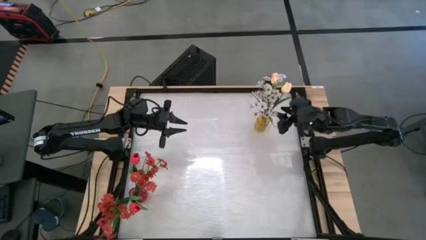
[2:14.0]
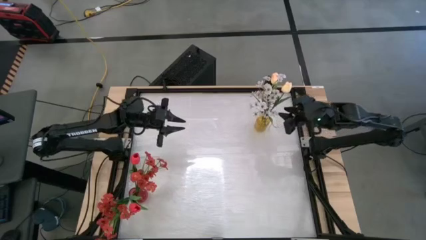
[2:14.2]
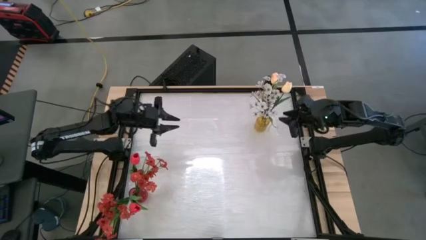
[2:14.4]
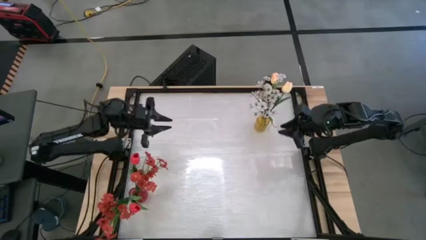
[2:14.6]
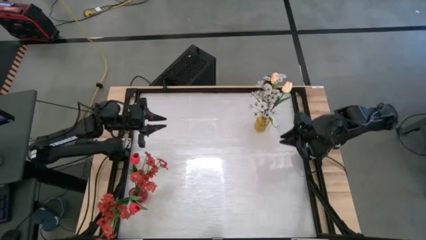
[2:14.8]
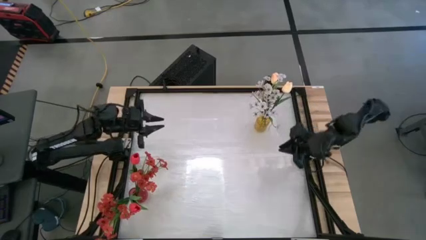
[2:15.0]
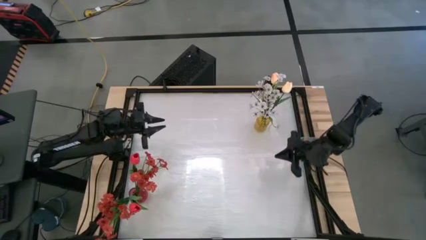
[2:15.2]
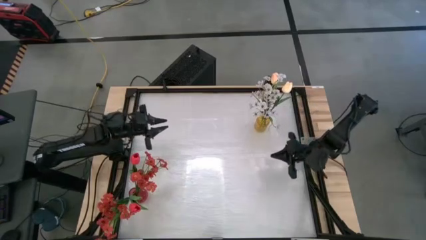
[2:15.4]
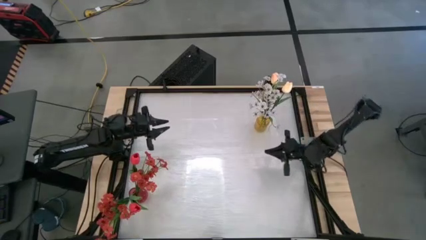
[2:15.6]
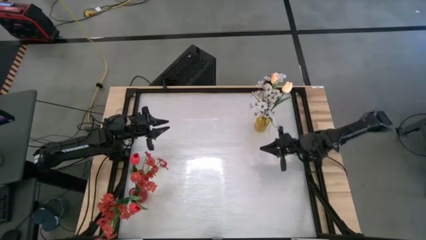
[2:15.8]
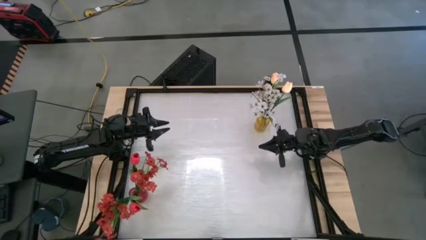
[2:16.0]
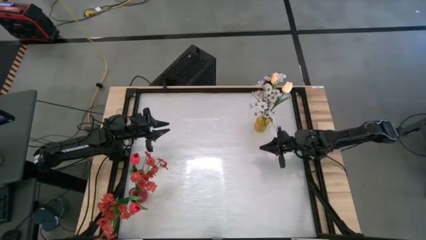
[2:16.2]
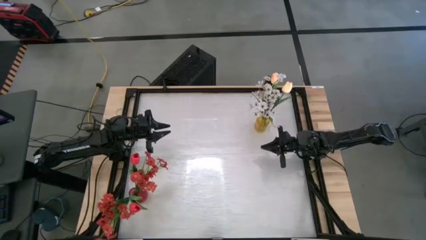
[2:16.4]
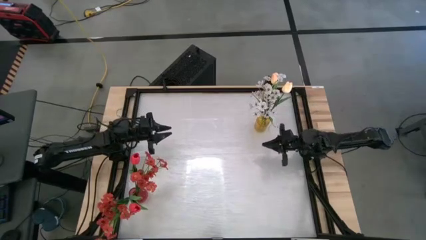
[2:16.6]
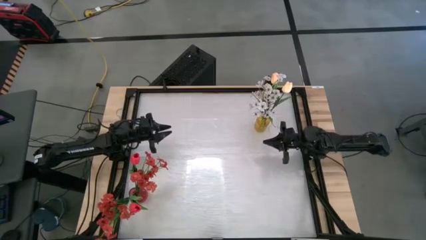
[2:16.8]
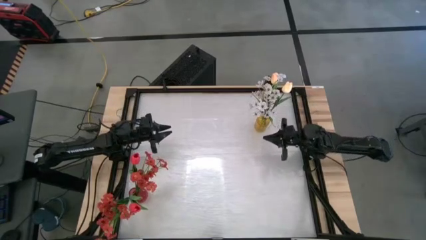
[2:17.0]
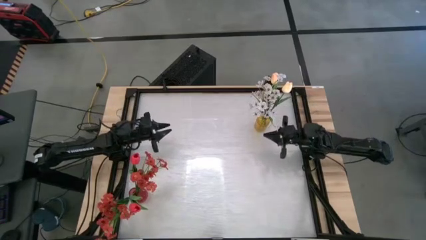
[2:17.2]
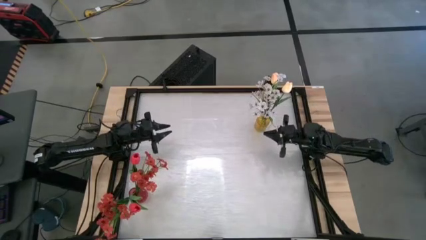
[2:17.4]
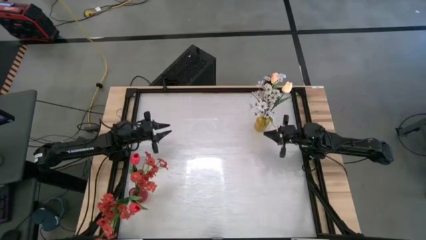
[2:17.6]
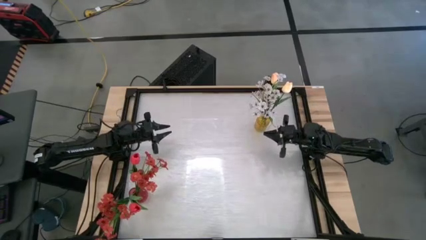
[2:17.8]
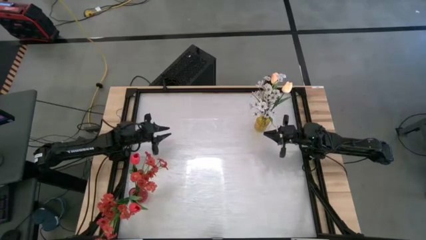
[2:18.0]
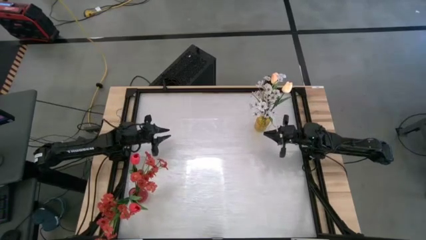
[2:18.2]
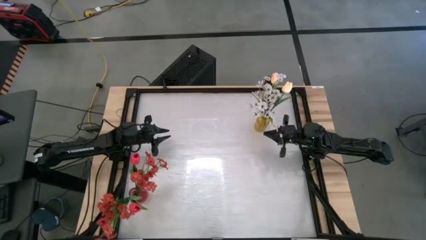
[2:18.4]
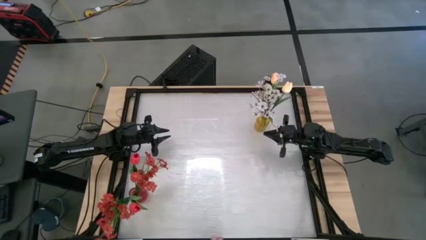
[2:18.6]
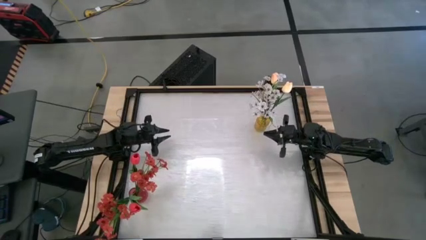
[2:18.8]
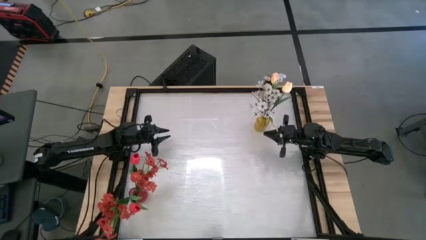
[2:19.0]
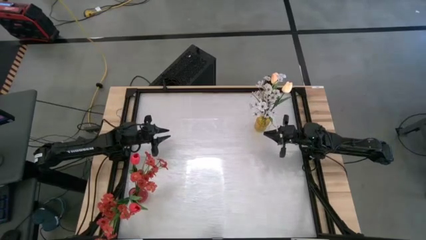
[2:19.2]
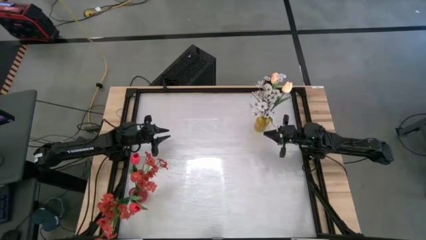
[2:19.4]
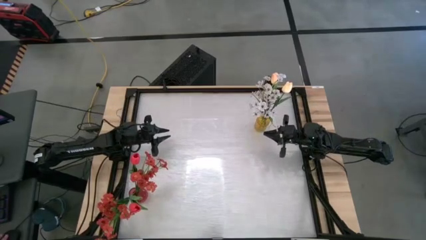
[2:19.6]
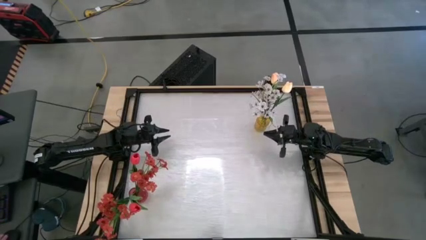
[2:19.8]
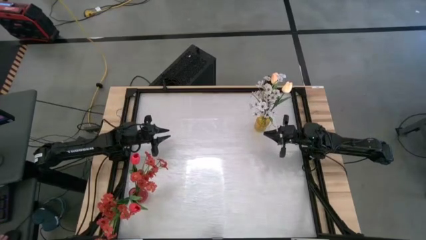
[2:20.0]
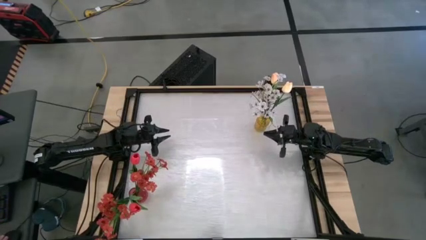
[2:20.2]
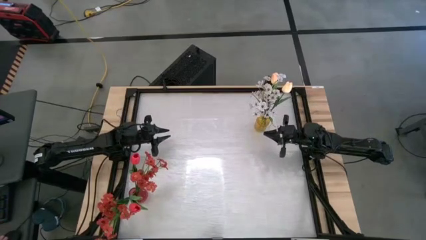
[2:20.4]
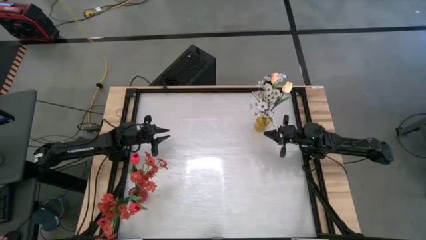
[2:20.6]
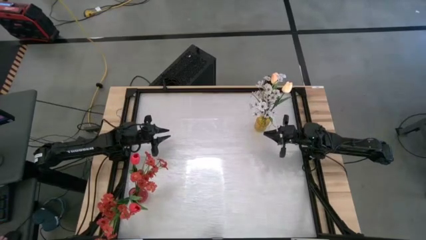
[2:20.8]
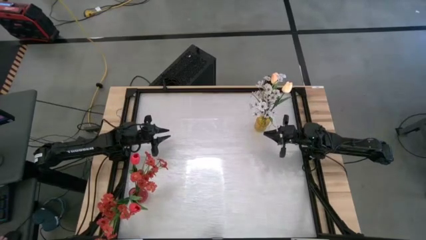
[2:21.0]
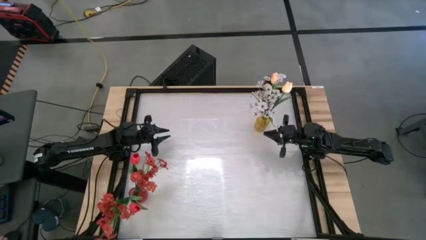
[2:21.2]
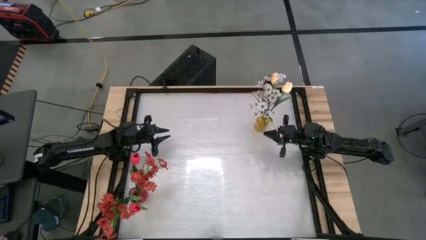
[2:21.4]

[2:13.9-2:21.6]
Task: Sort flowers into vase by color
Return to Home Position

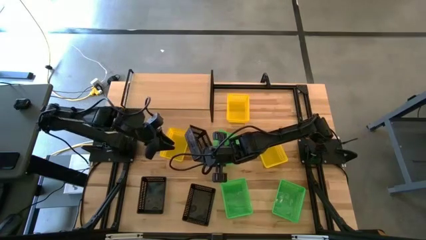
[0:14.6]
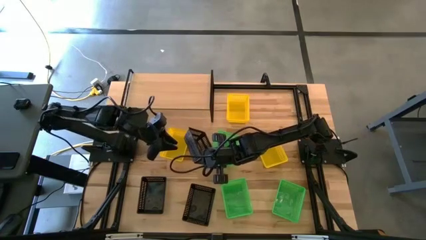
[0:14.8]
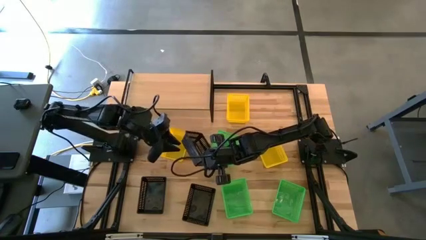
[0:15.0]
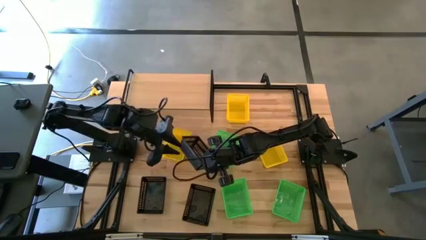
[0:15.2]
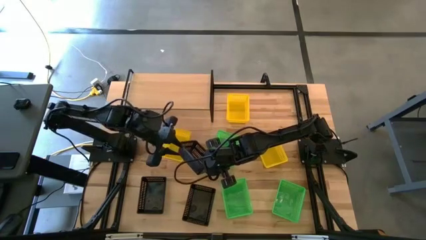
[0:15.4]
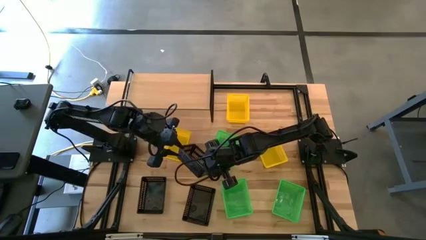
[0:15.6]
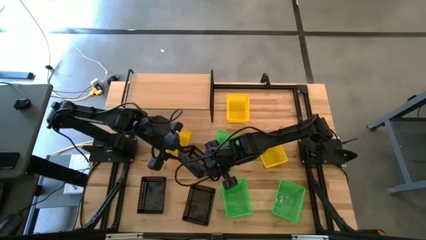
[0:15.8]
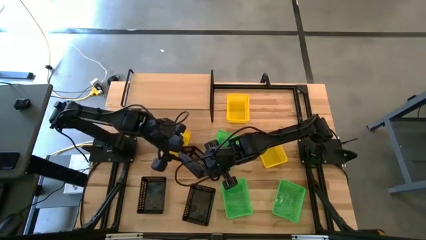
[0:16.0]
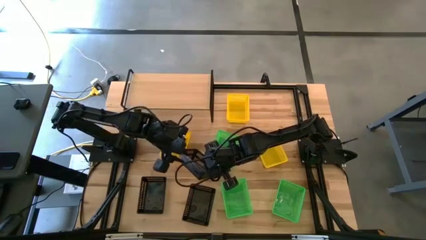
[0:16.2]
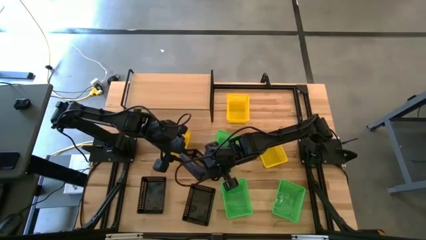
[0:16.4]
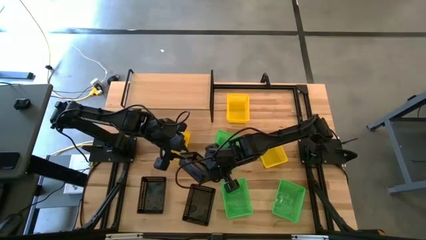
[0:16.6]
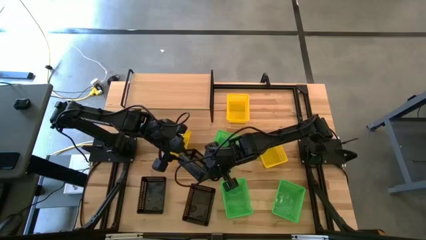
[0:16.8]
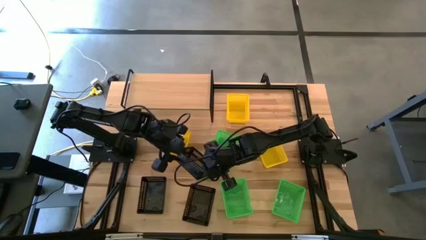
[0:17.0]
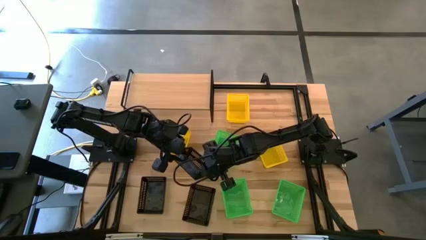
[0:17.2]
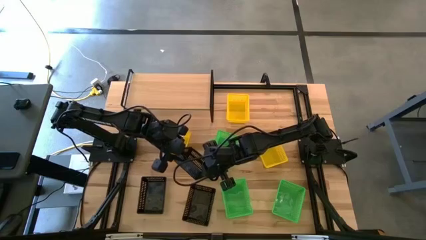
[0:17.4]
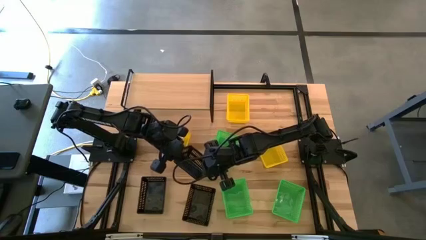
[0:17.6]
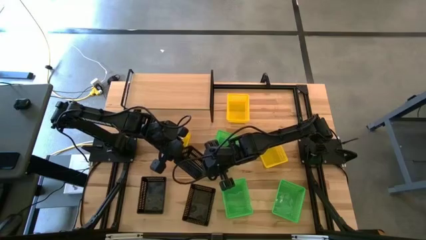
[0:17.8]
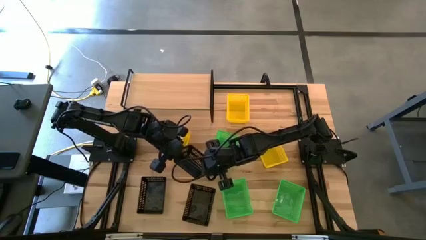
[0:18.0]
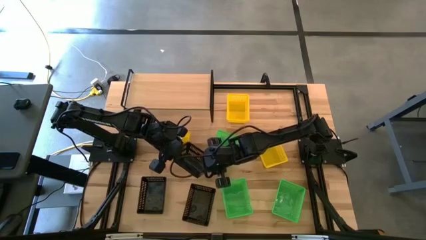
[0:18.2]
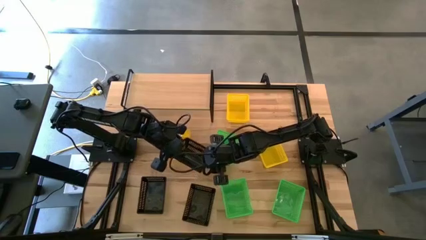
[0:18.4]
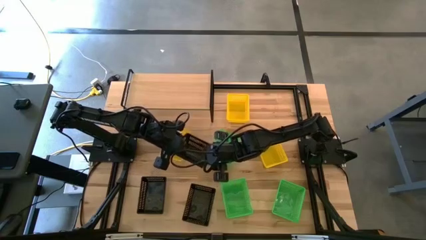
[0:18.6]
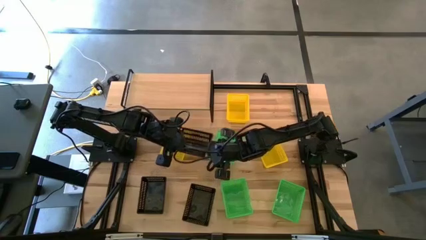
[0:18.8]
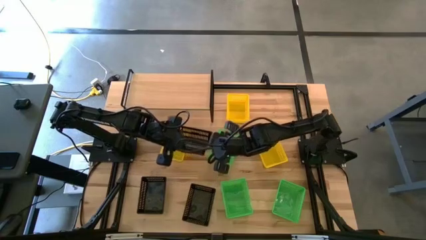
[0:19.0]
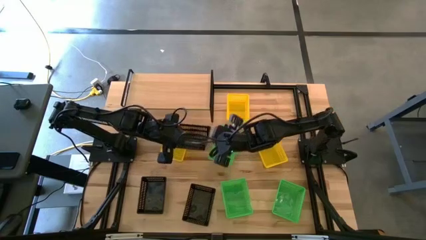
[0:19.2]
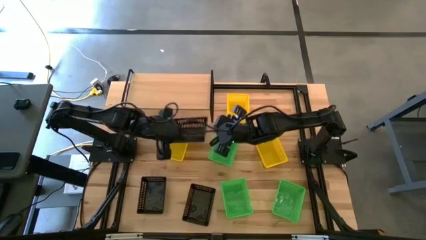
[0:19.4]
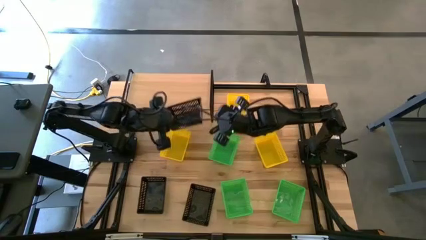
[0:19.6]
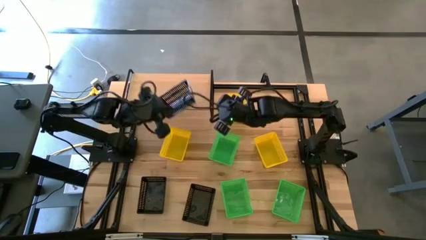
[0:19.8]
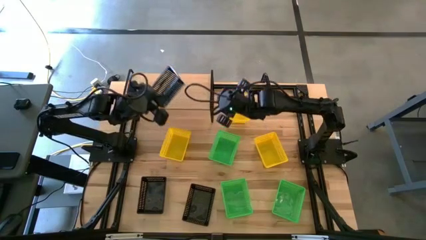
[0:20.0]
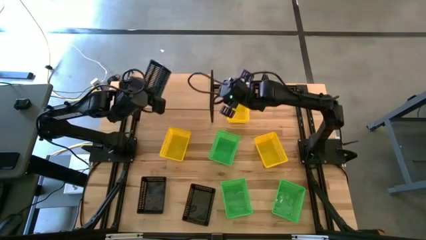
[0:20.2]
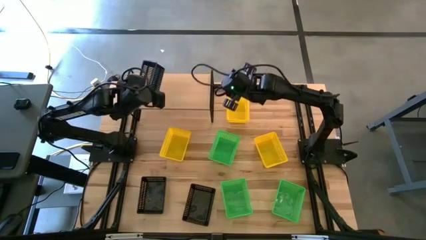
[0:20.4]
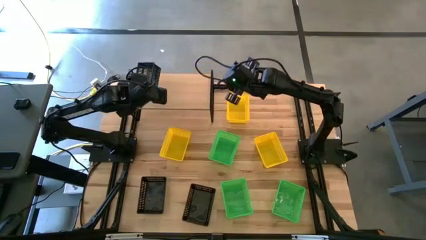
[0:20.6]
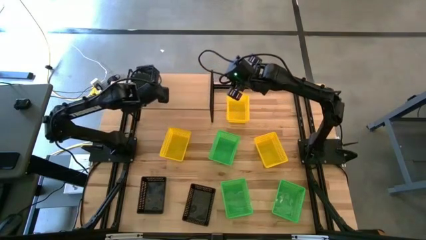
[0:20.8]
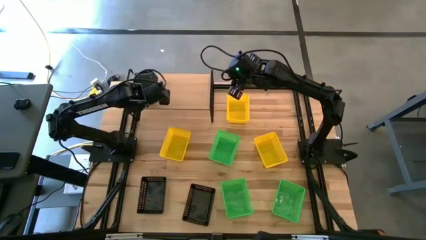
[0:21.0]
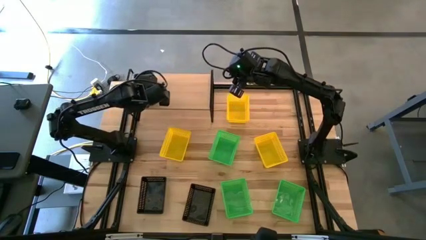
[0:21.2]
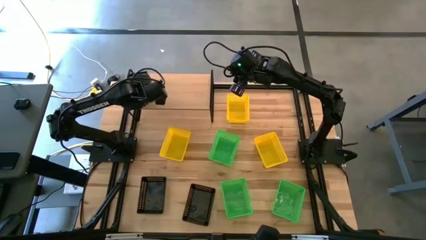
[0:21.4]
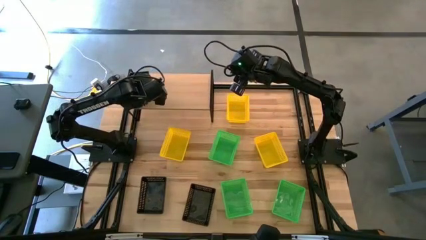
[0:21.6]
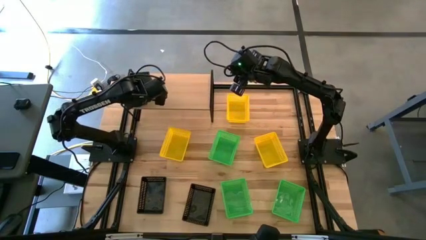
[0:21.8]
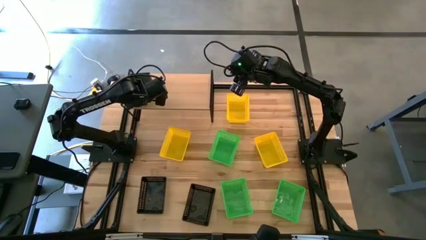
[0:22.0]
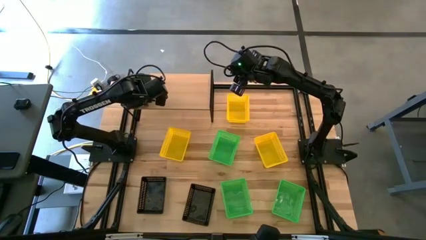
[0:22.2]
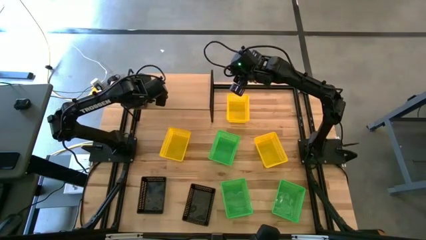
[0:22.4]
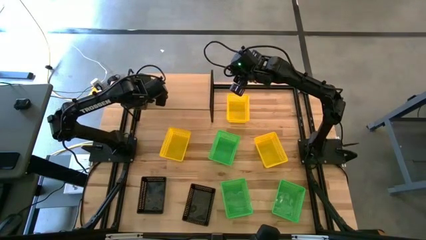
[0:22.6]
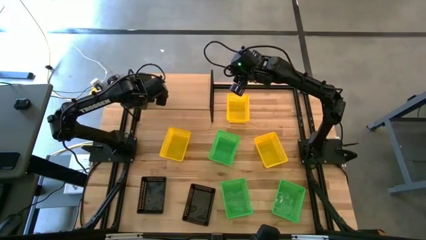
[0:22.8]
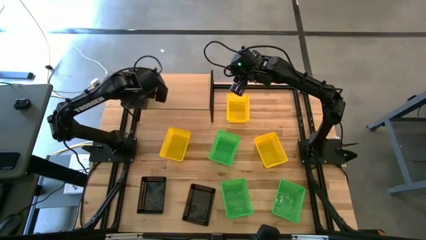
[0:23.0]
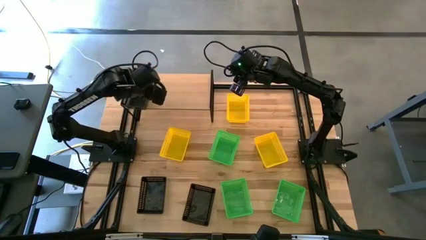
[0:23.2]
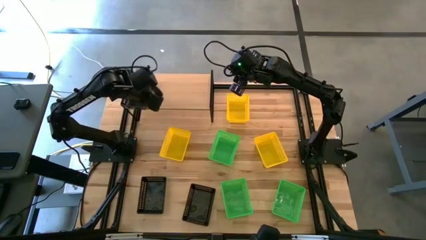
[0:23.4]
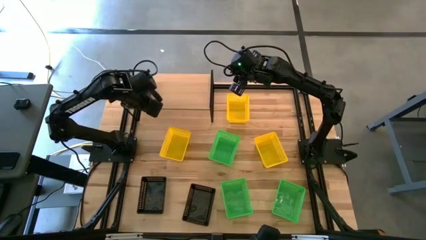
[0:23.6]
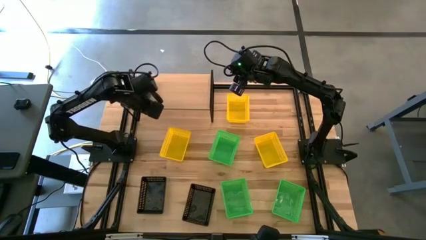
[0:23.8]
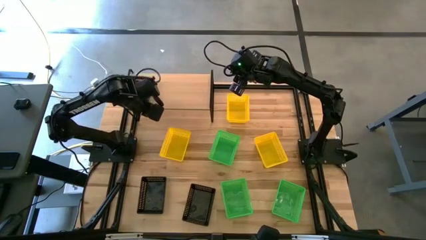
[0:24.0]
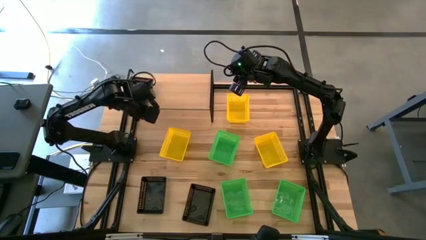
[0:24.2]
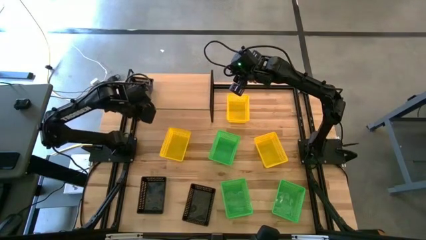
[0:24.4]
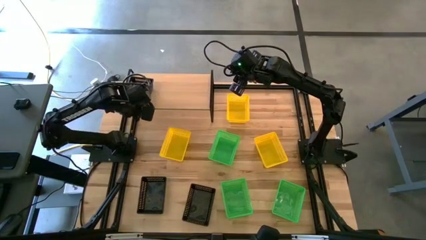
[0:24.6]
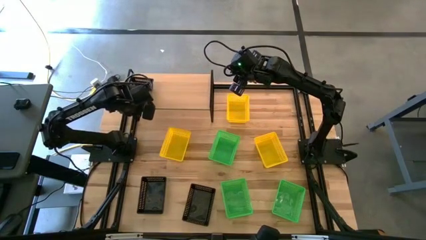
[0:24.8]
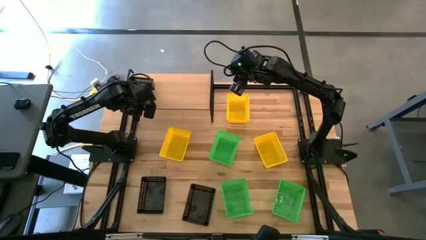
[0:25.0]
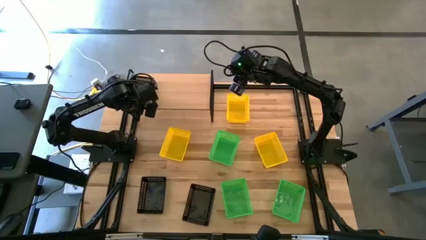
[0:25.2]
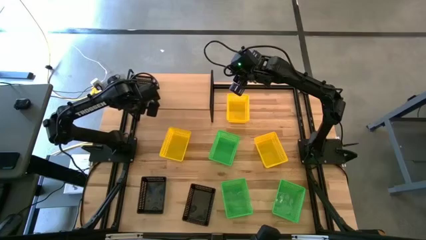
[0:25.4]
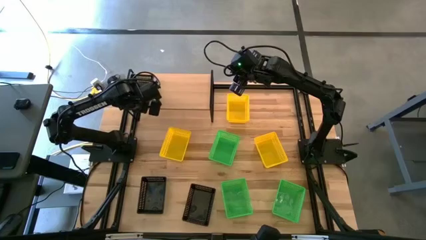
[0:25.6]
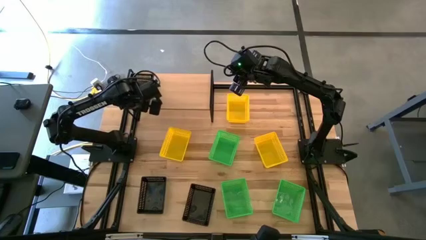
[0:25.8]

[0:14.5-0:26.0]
Task: Stack baskets on shelf by color
Put the top right black bin on the shelf
